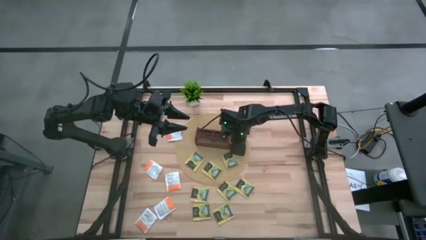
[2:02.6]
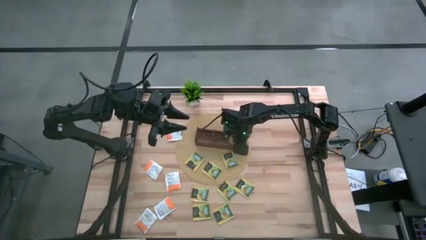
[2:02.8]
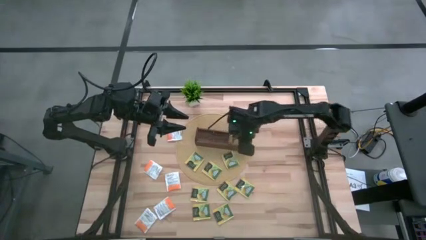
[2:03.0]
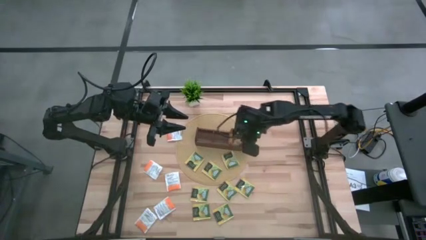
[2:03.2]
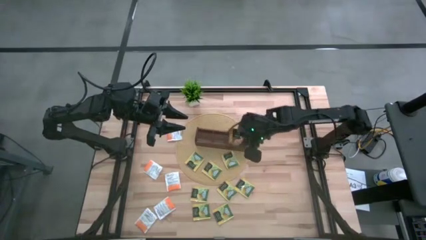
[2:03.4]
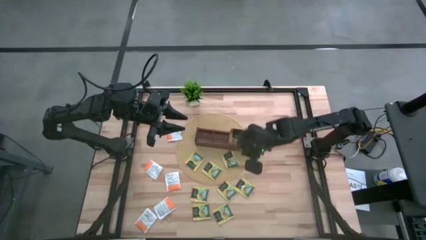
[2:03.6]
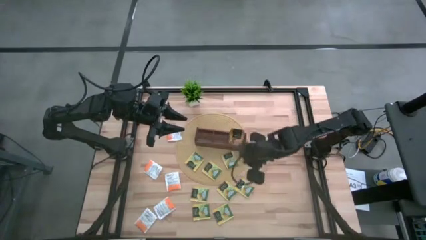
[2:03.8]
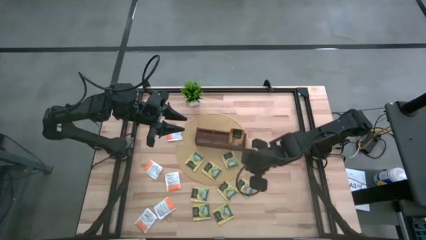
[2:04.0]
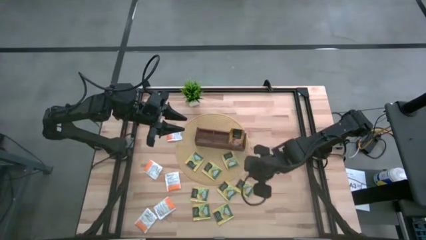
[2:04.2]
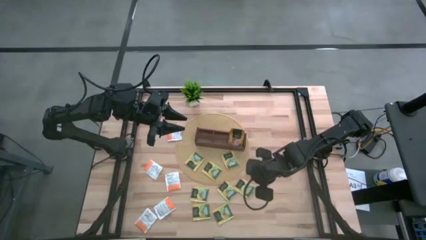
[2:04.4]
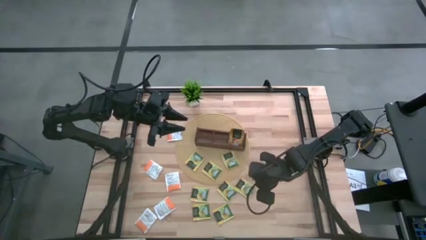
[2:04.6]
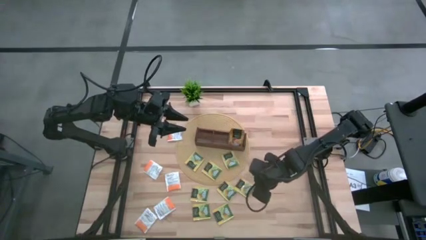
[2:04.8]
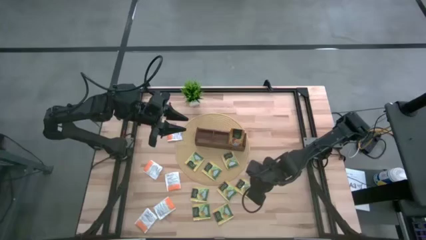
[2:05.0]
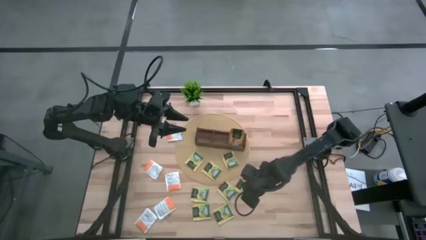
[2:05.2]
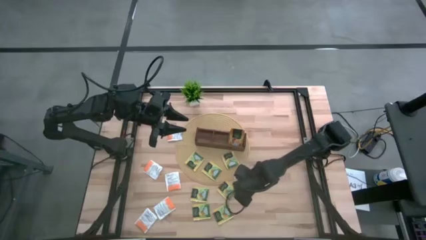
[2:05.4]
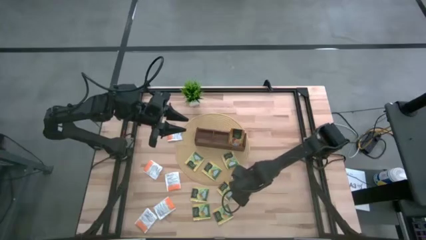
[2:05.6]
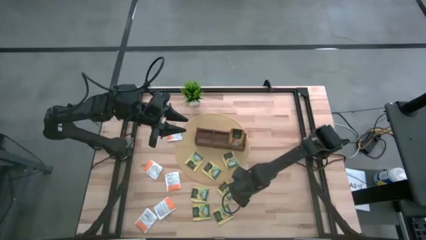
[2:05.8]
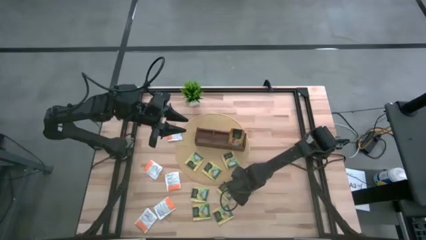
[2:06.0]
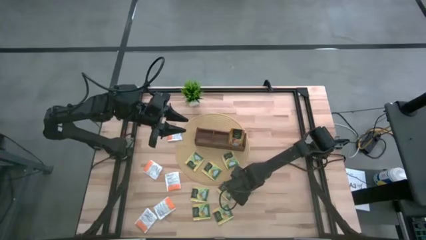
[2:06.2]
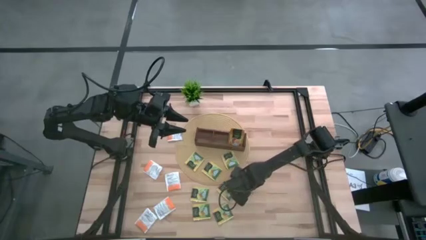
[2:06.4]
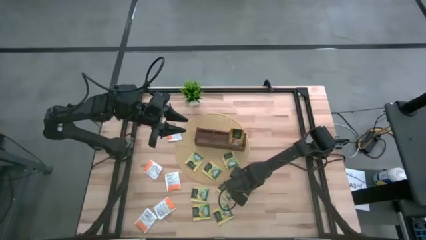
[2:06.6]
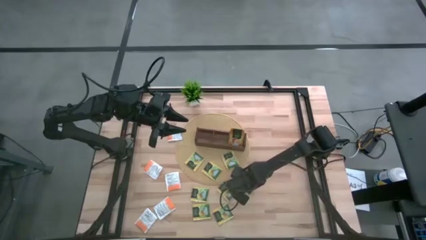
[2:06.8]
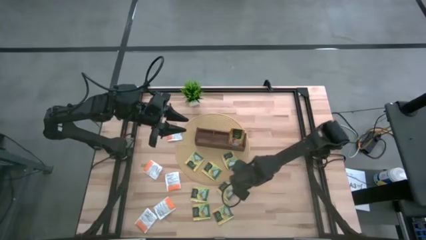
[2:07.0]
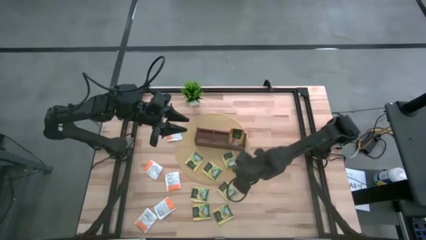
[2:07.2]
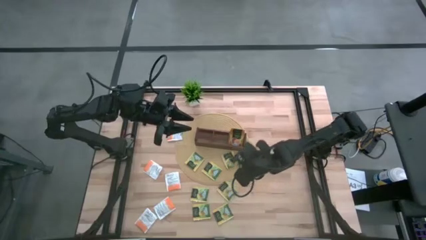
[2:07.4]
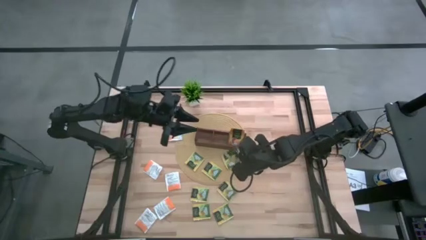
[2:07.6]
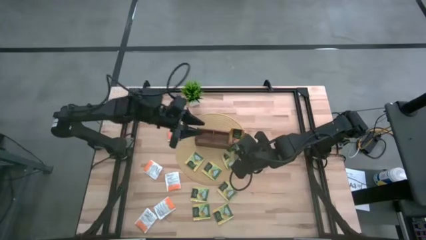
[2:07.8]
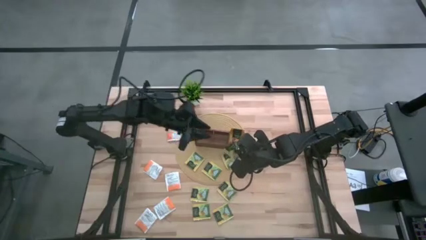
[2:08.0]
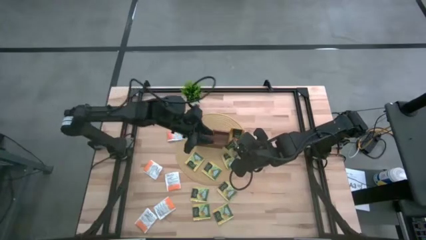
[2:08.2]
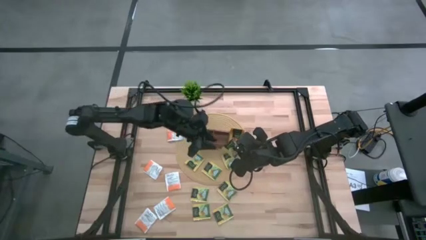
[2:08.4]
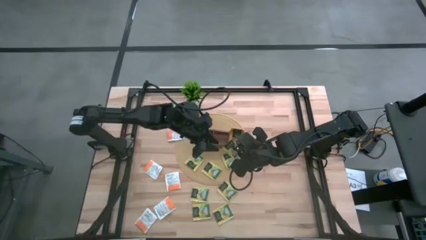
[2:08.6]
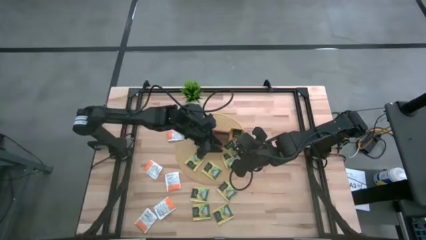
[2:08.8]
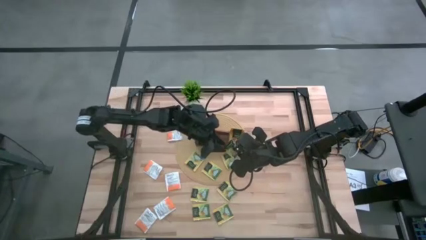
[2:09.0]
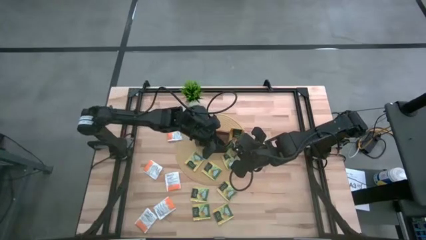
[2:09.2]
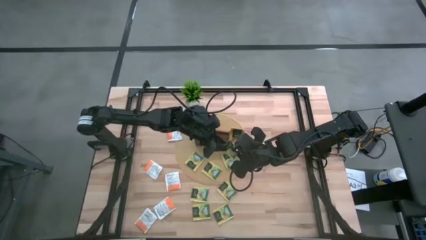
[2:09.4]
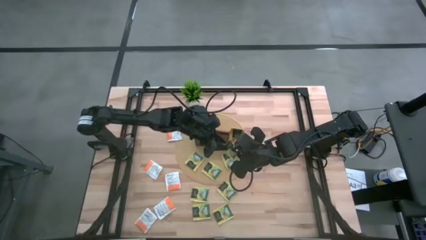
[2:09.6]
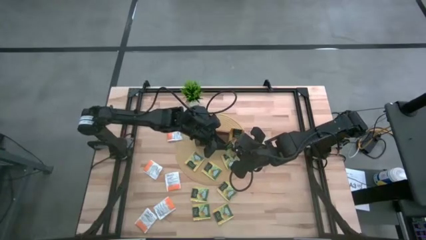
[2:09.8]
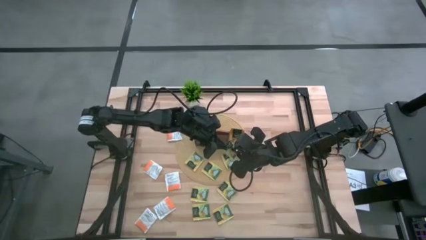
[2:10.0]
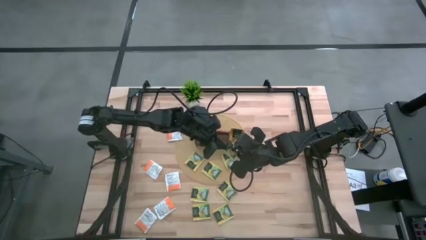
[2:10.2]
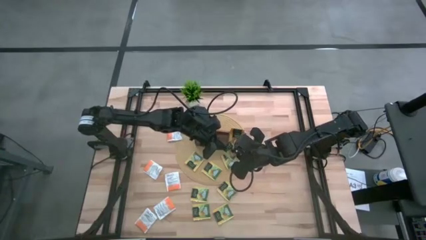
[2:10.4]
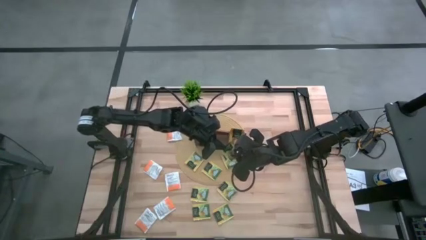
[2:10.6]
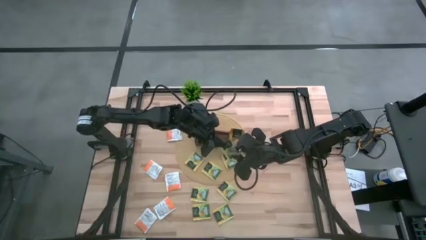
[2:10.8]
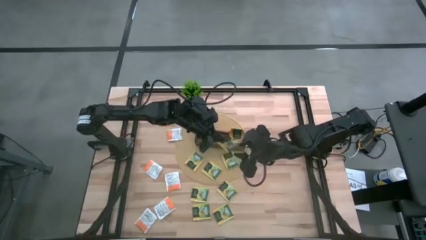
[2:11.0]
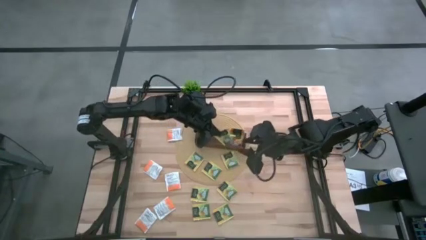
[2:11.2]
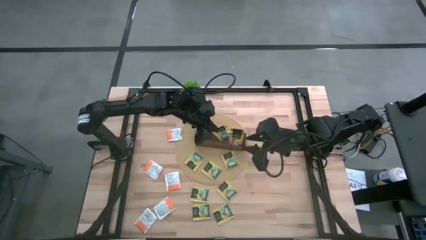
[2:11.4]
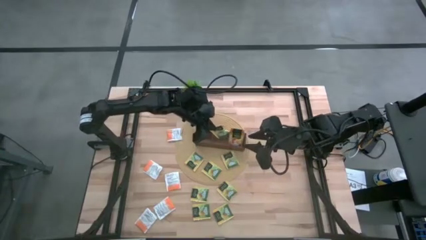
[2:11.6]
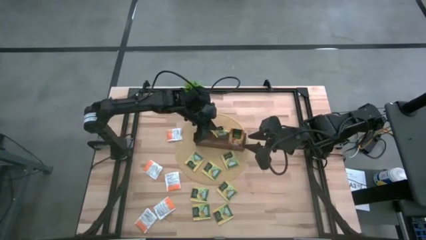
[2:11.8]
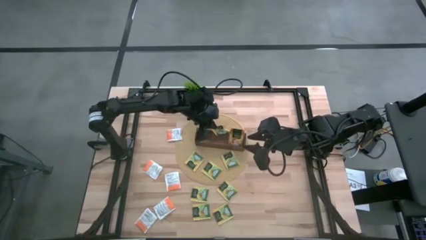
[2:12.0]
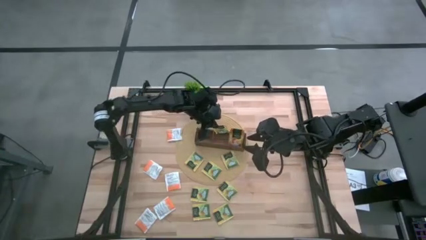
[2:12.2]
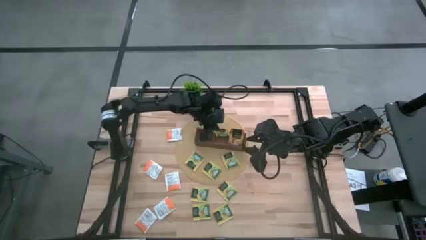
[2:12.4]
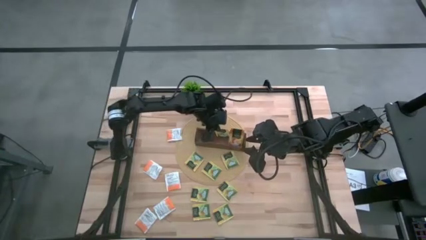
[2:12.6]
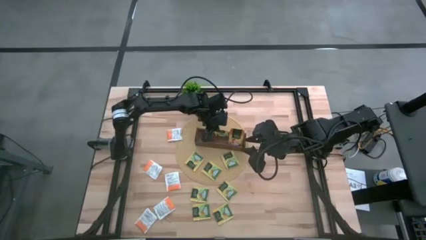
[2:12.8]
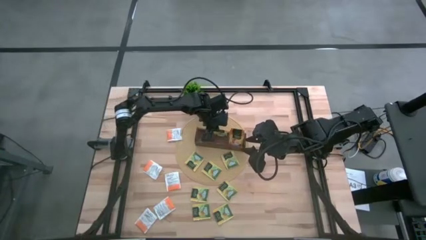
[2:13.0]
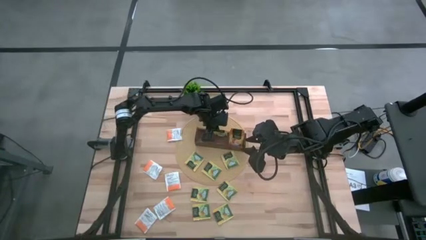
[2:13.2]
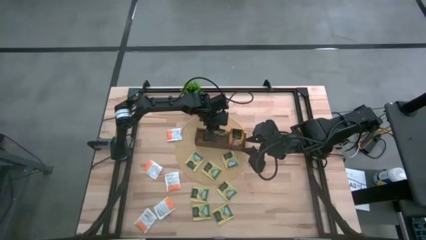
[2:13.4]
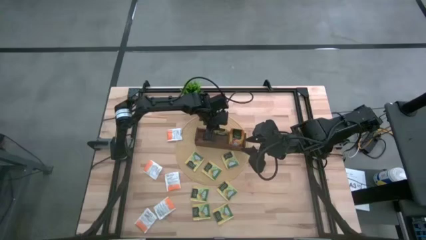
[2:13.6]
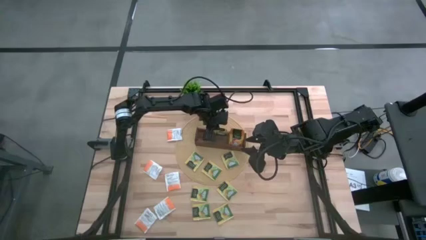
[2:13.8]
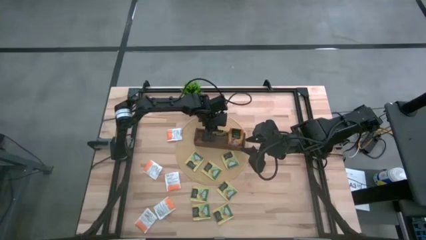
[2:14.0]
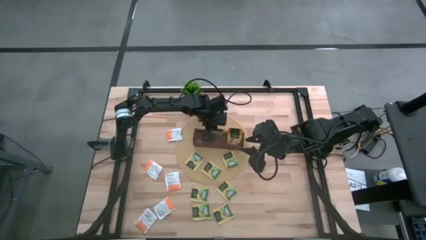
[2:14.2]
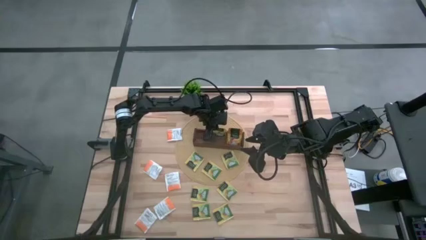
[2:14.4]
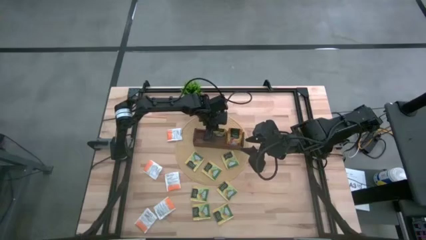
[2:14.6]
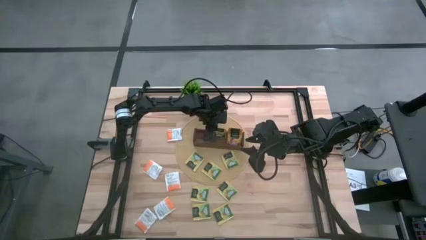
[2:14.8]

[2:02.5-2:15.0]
Task: Pick & Place Tea
Put the yellow tea bag into the middle section of the wooden organizer

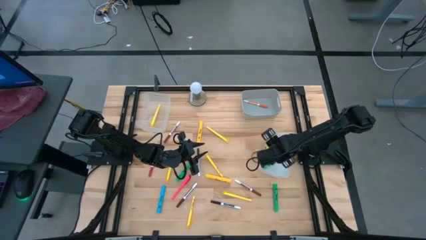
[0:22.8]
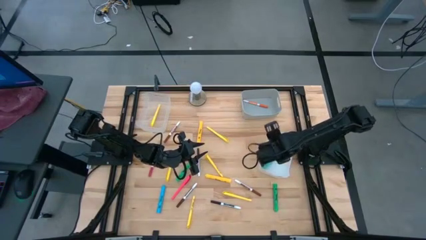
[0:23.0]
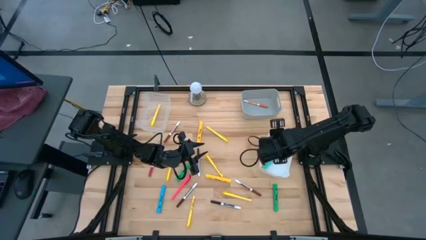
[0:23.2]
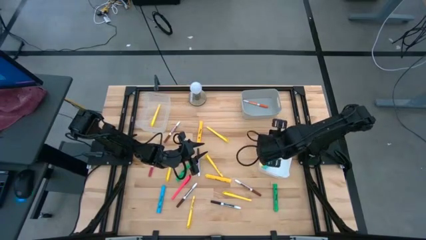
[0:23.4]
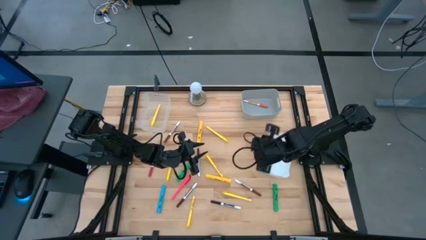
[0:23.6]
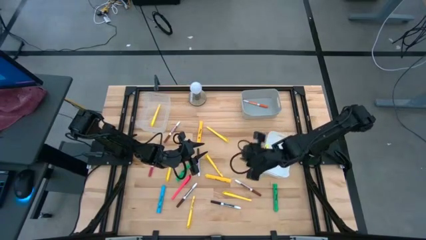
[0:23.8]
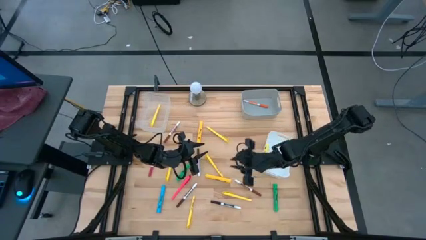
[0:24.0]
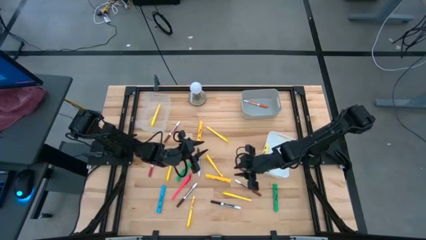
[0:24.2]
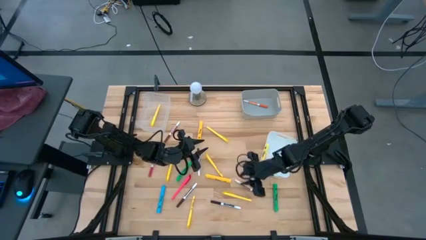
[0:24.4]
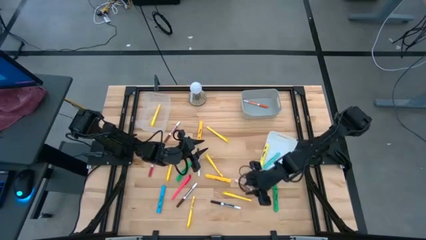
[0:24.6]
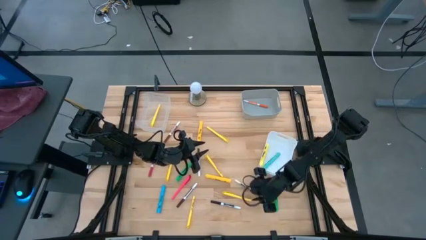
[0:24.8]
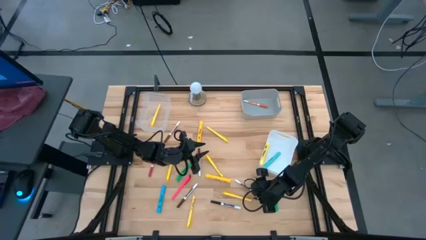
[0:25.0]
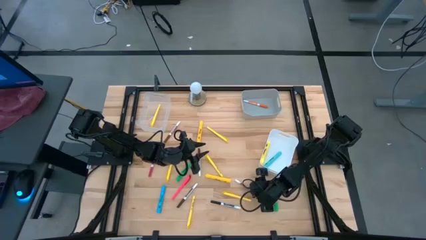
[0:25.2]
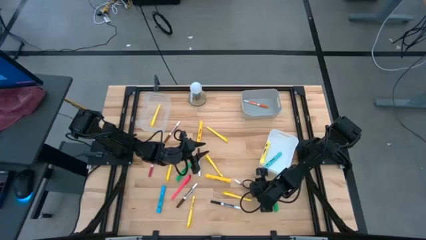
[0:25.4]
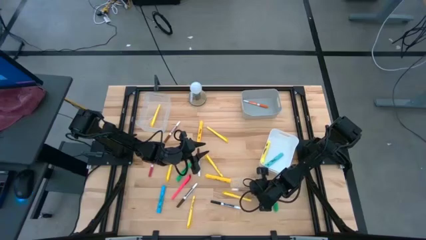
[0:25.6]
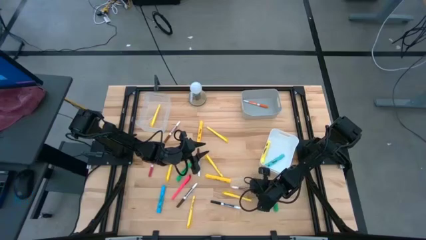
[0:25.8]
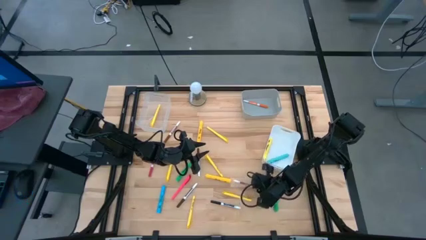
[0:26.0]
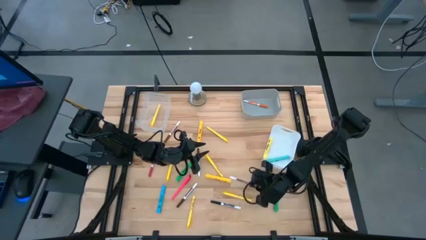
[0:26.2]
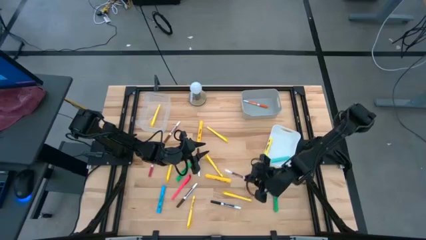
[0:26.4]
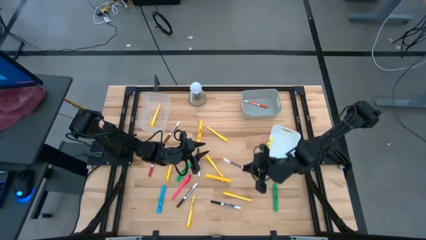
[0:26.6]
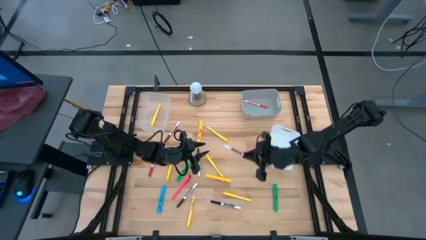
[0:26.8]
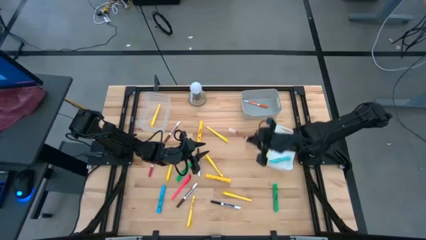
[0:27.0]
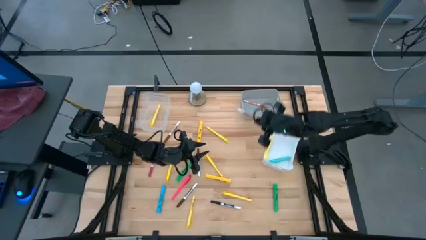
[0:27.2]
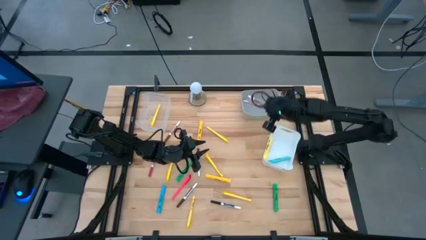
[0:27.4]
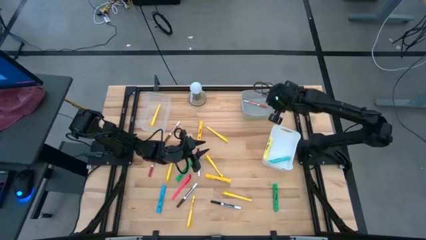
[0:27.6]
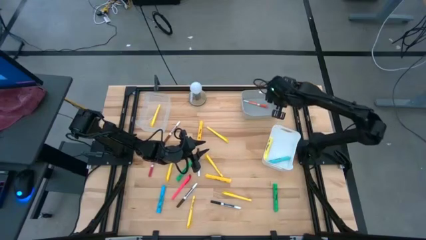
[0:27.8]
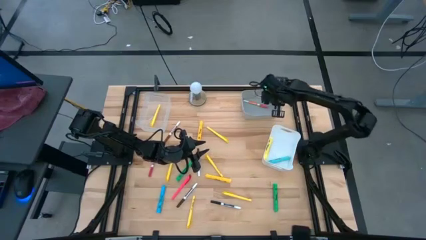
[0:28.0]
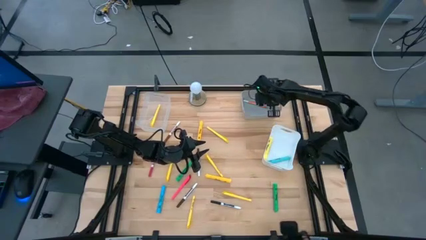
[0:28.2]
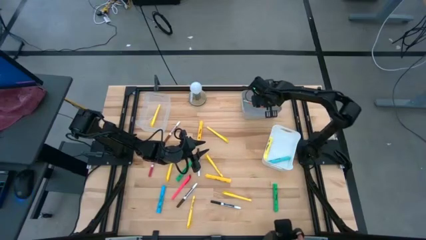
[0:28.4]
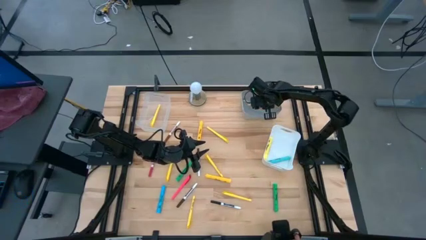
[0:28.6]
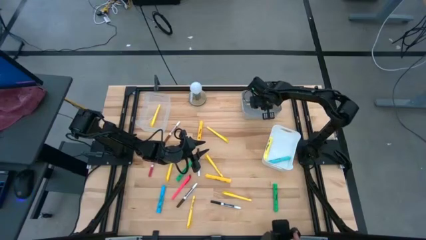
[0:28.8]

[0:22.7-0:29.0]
Task: Pick & Place Markers
Put the right light brown marker pen into the gray bin
